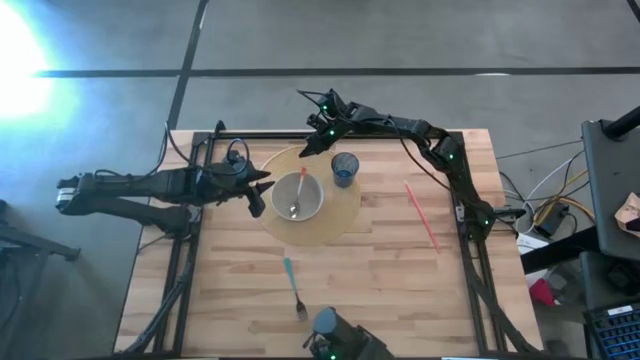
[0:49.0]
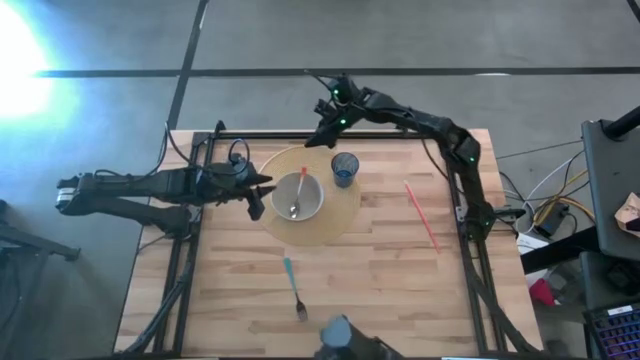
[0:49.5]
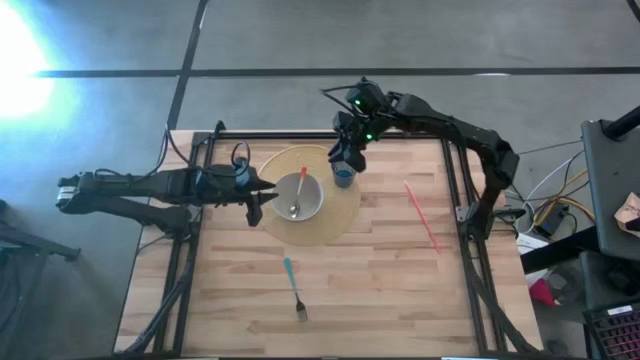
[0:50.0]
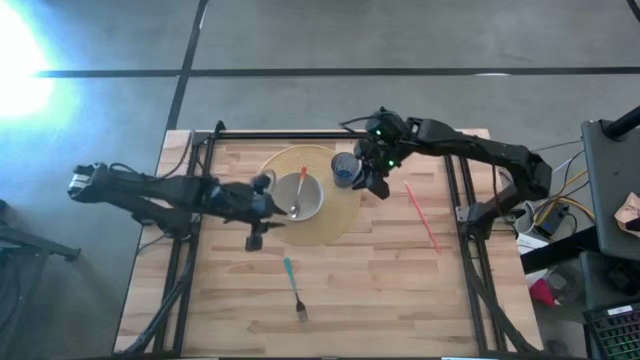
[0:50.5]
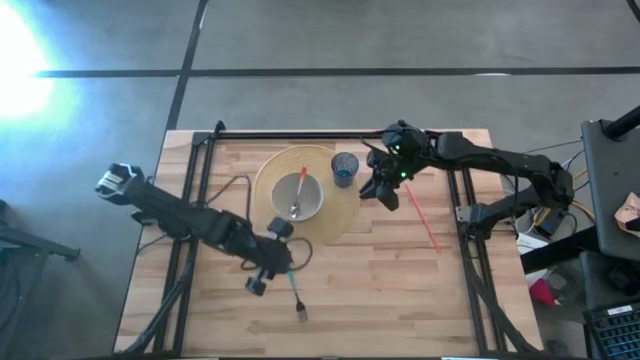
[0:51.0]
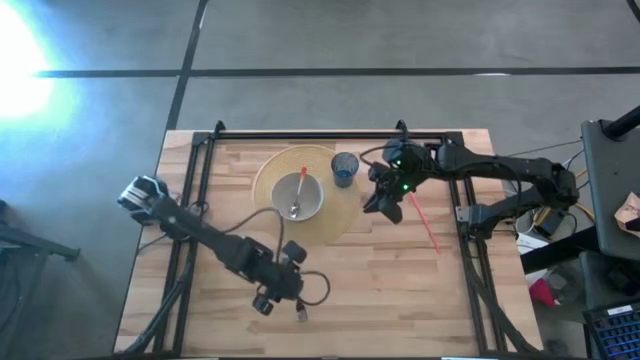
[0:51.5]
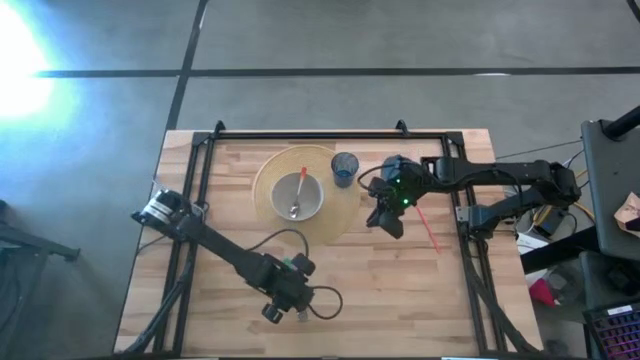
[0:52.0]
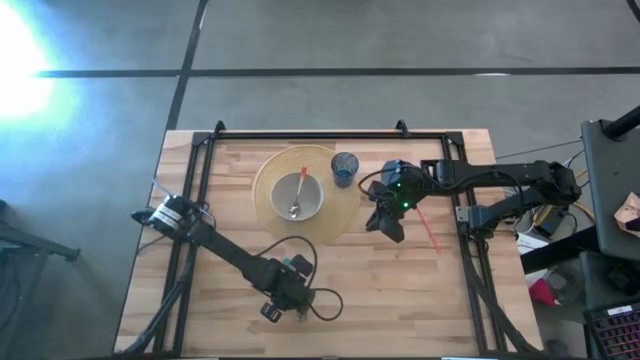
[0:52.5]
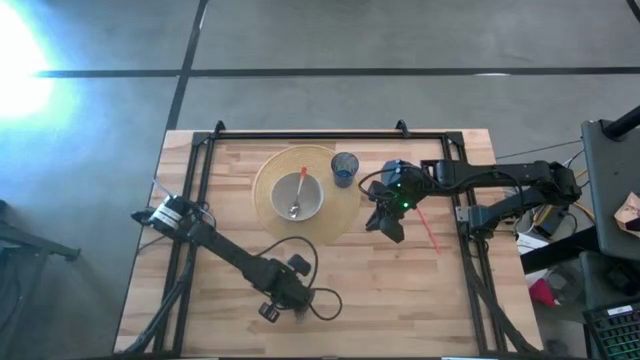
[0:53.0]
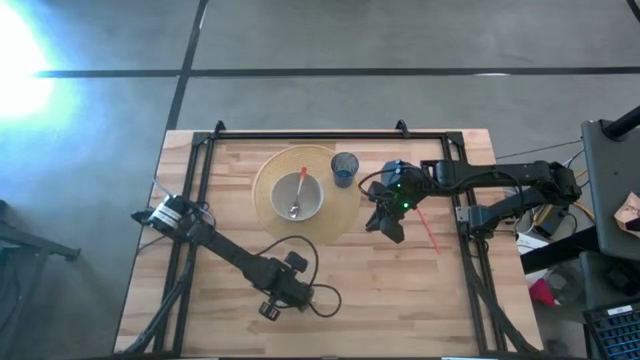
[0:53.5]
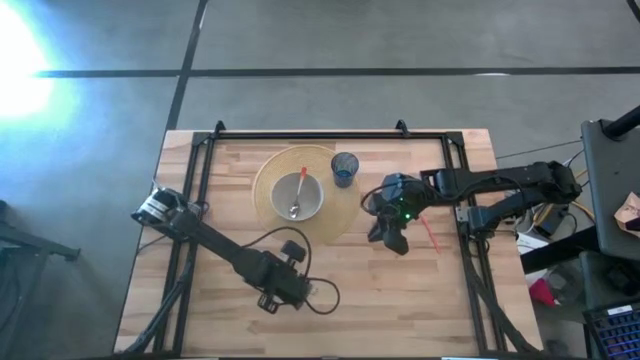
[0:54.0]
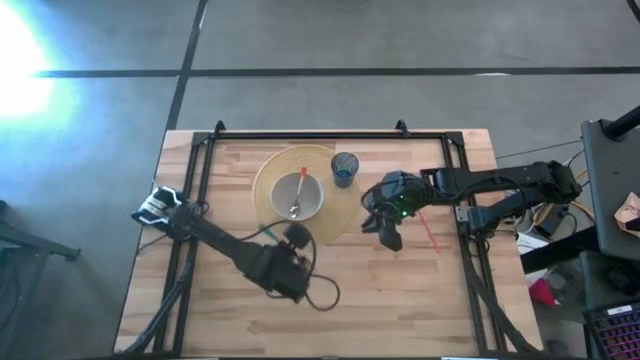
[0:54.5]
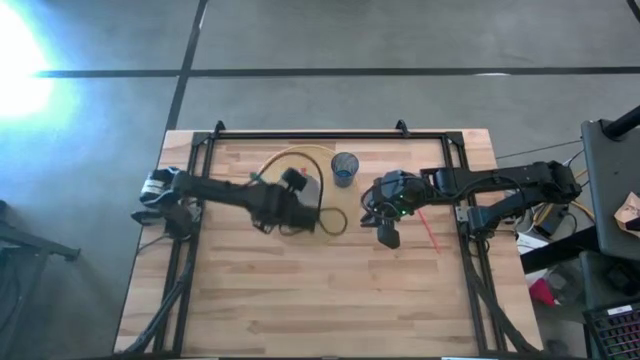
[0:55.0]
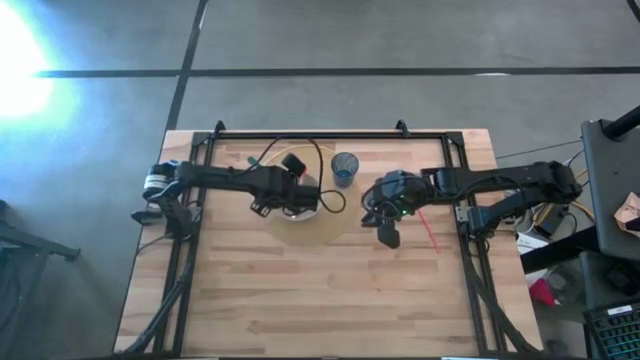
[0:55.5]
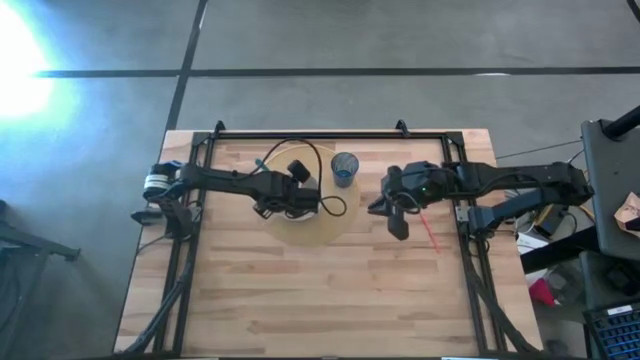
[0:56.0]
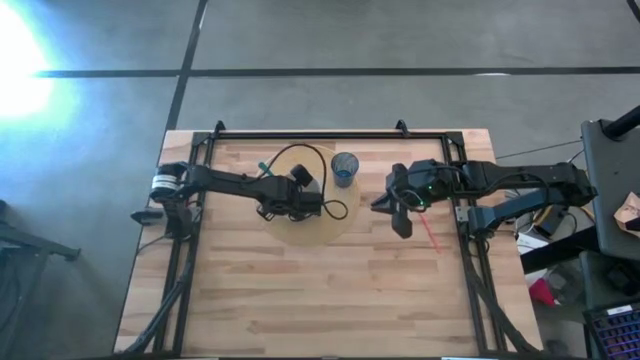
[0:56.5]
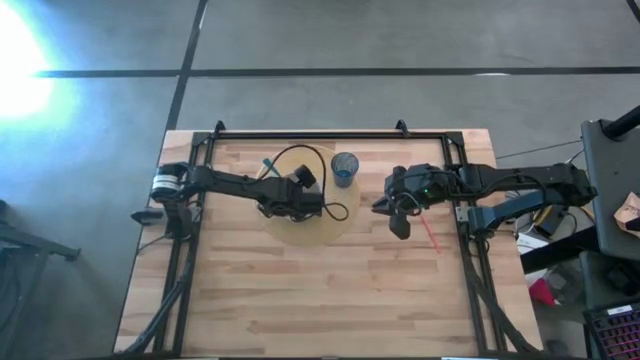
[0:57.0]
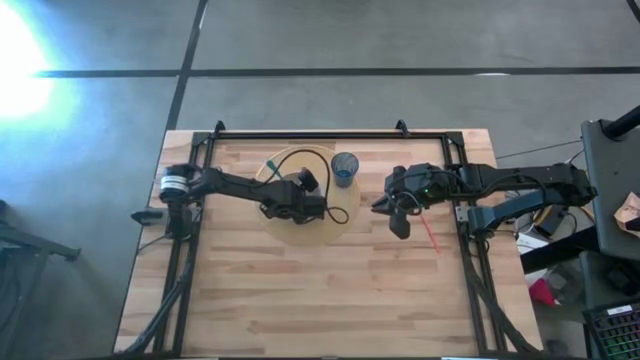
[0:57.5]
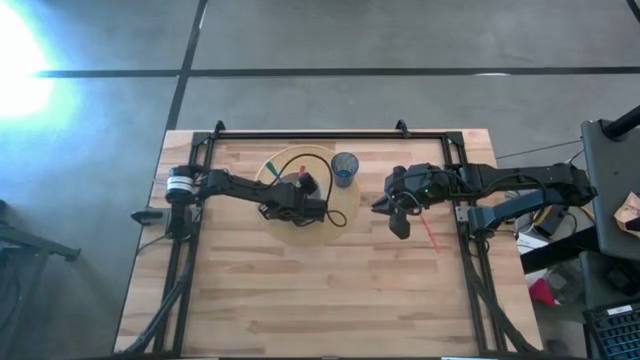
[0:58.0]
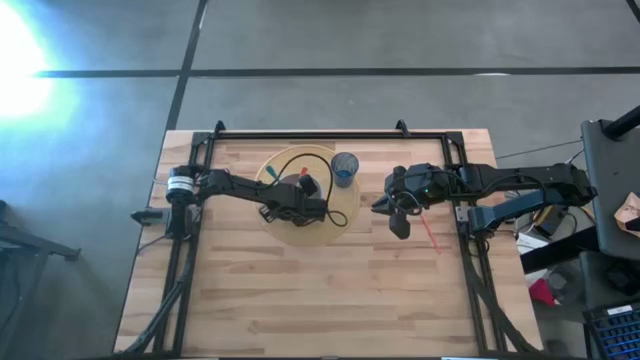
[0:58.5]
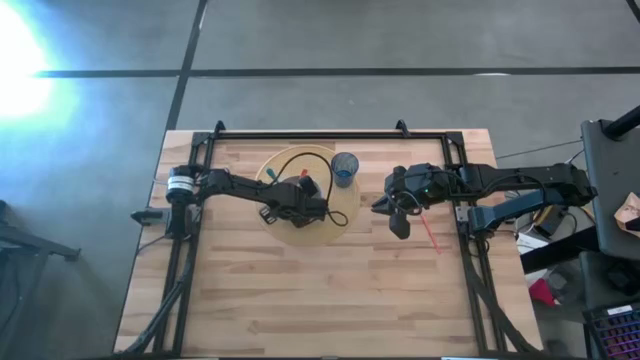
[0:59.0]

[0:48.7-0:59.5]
Task: Pick & Place Utensil
Put the blue fork into the gray bowl

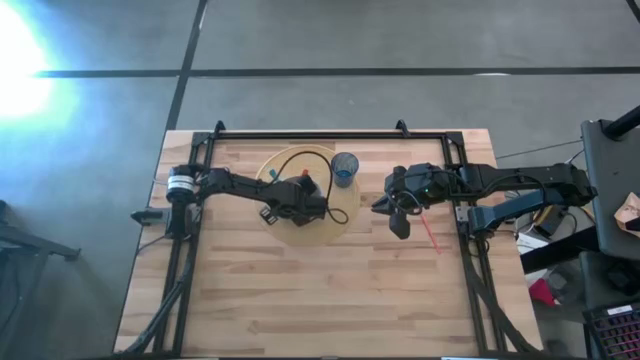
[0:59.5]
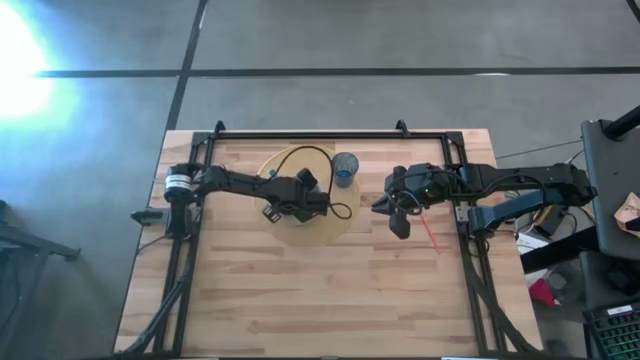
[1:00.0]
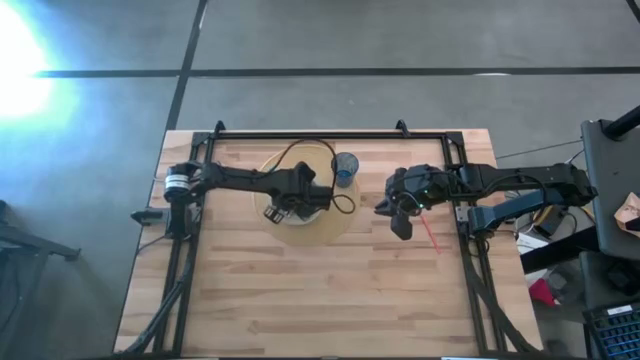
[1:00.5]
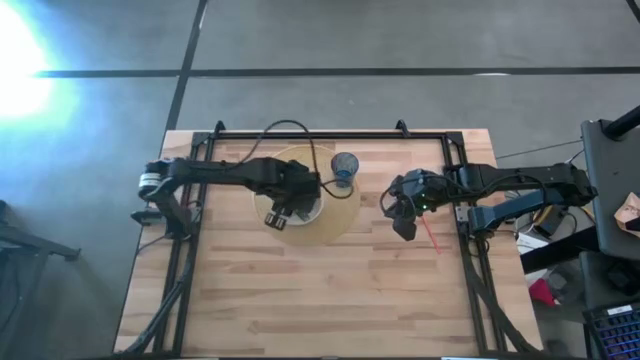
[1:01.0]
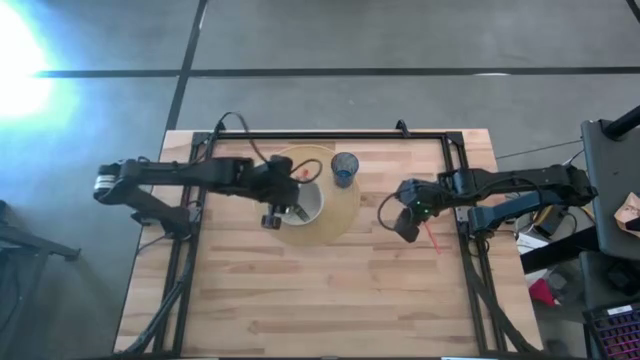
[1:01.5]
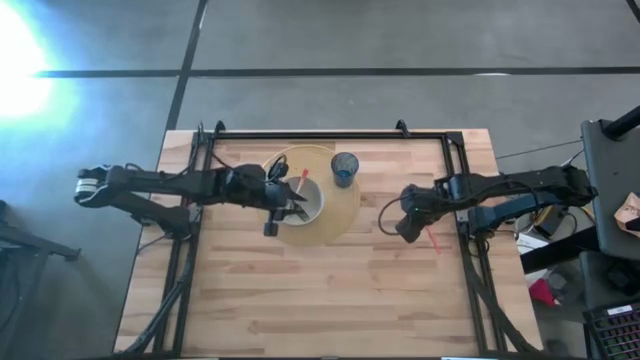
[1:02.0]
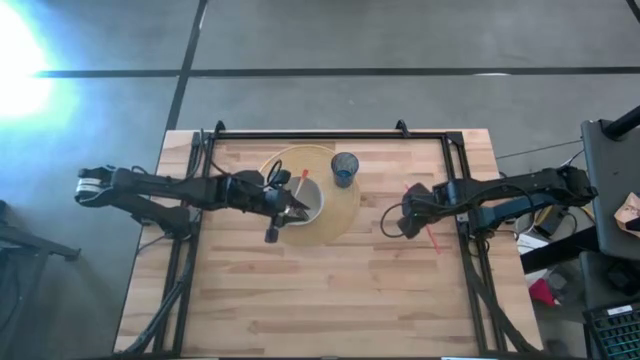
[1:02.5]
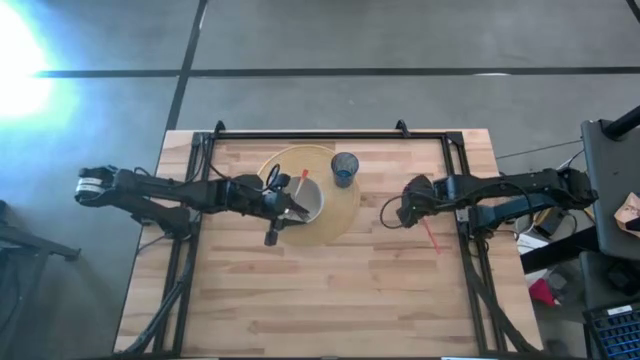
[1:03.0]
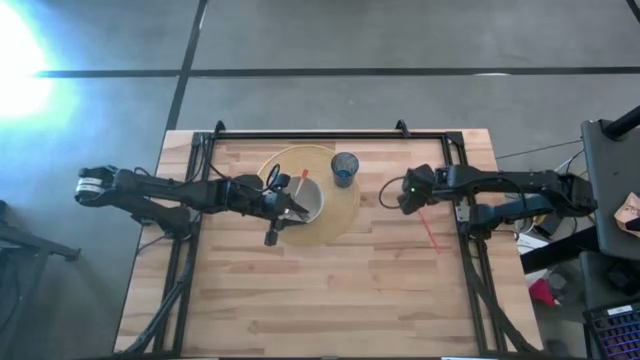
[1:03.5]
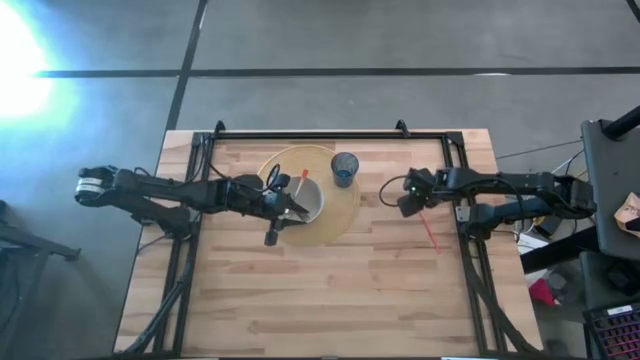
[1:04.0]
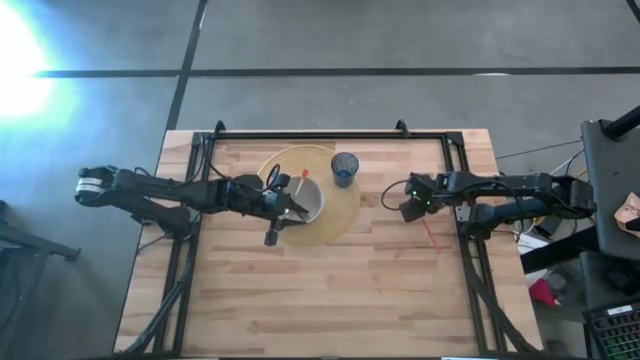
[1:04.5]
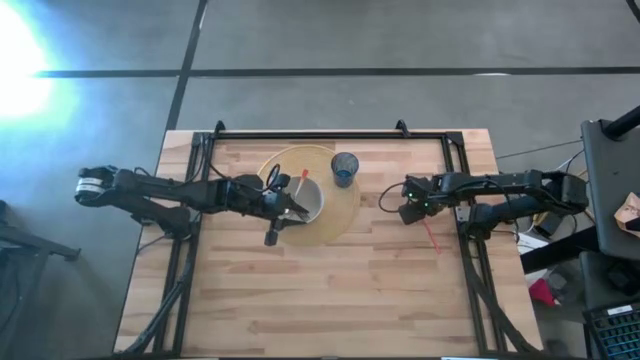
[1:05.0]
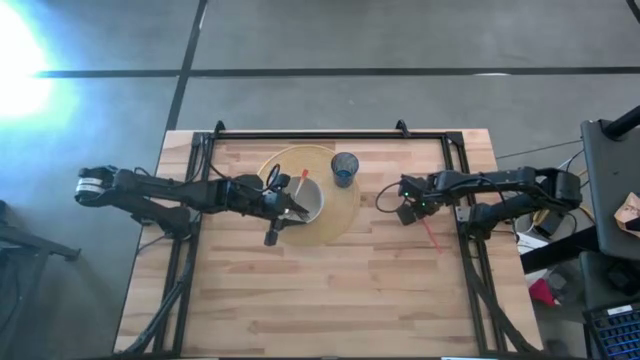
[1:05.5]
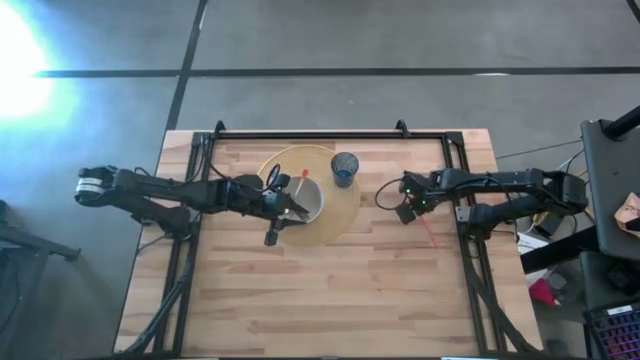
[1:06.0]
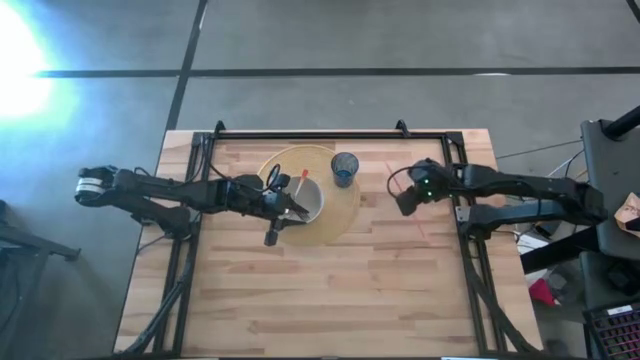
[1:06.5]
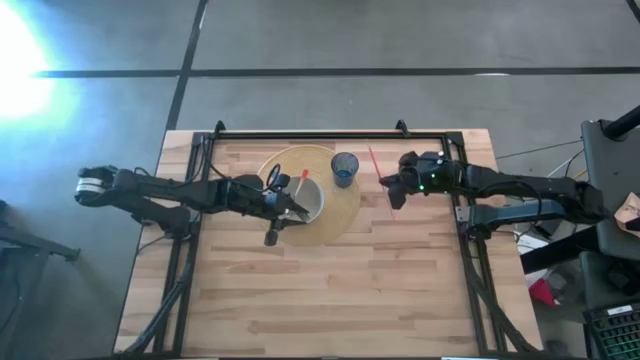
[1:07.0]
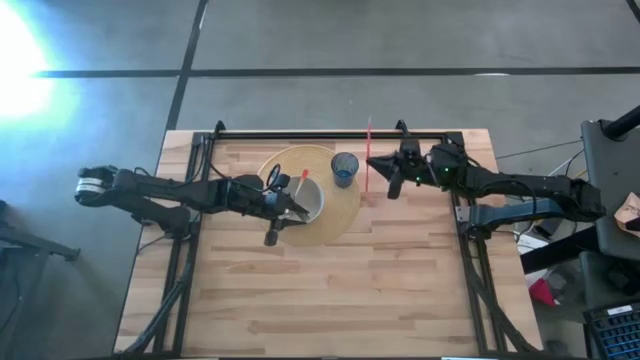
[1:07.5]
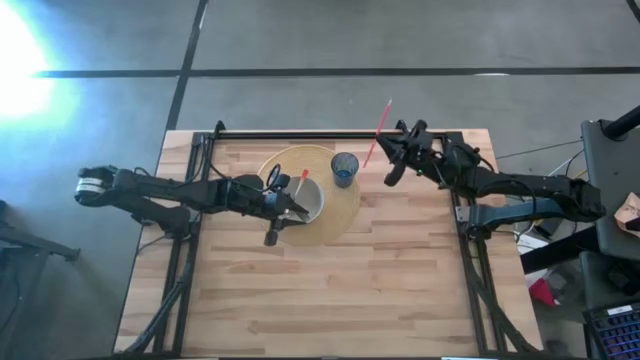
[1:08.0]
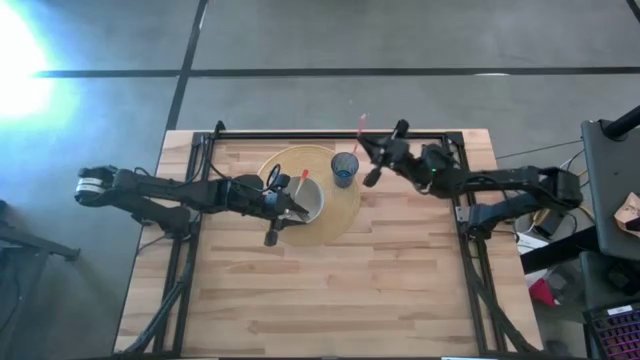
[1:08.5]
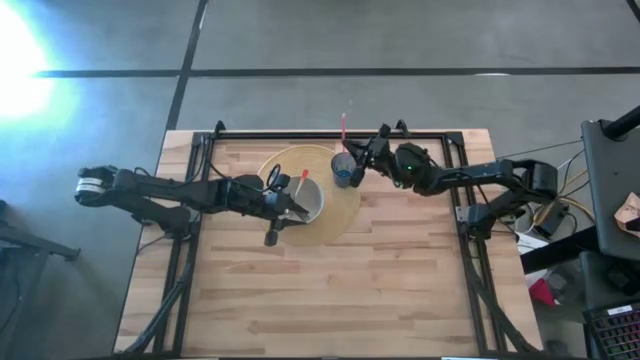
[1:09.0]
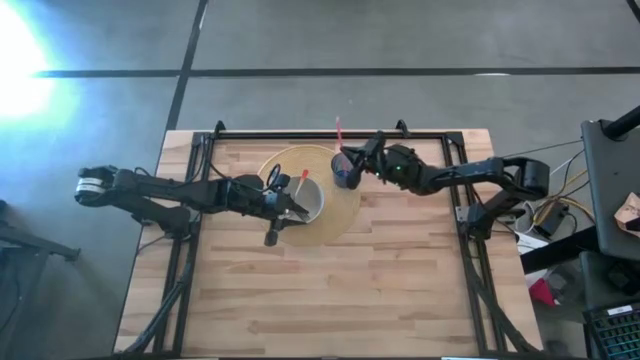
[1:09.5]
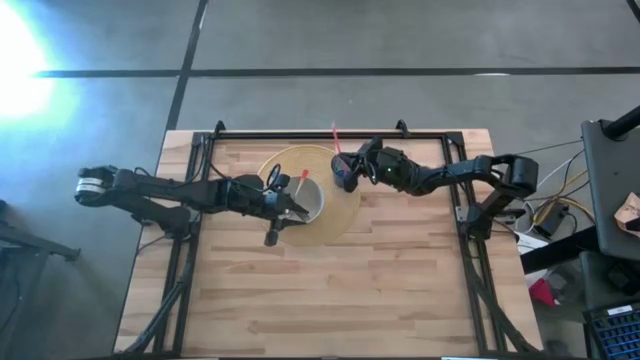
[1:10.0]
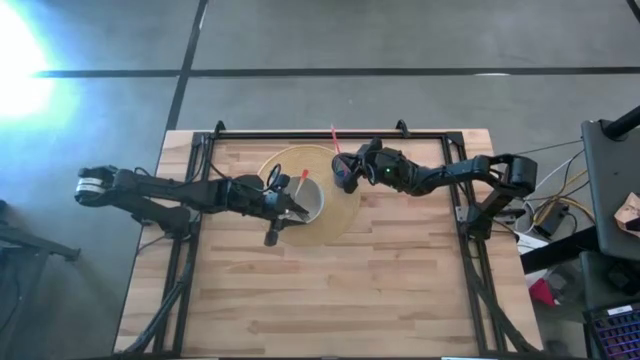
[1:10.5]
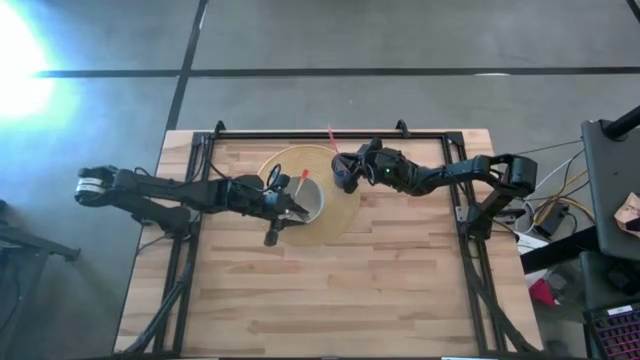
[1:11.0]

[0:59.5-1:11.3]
Put the orange straw into the blue cup

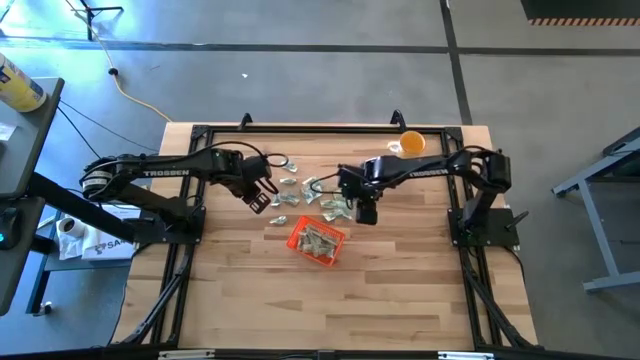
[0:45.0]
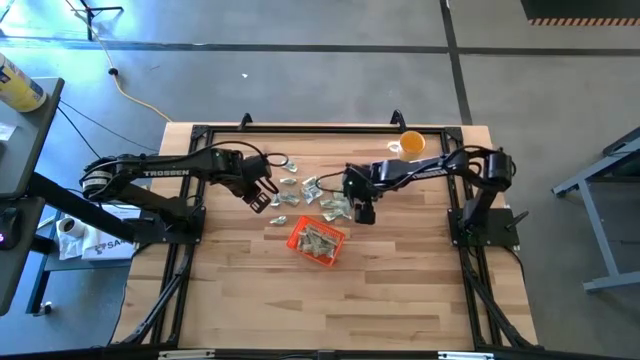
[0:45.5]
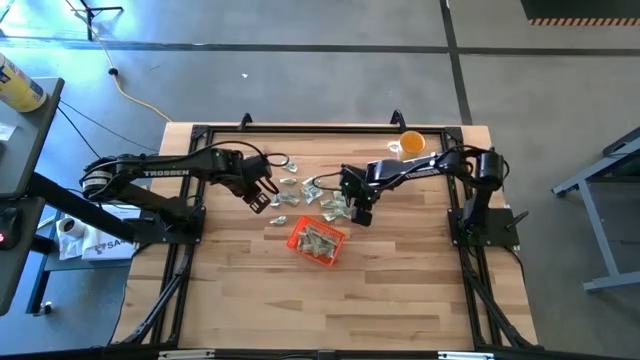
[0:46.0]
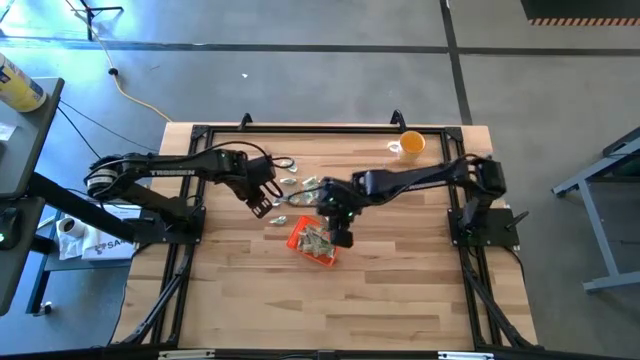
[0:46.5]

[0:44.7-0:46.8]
Task: Pick and place Stevia / Truvia into bins
Put the stevia packet into the orange bin
